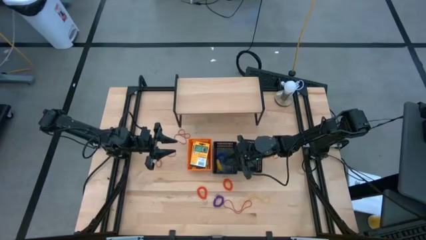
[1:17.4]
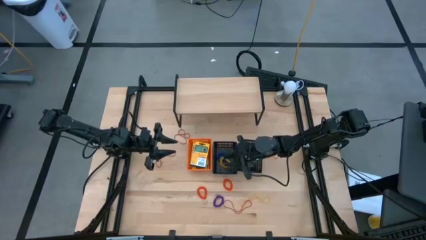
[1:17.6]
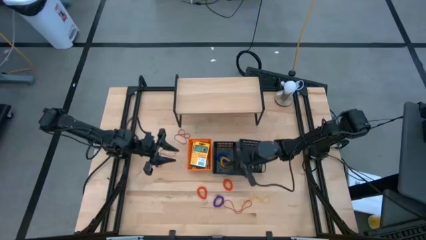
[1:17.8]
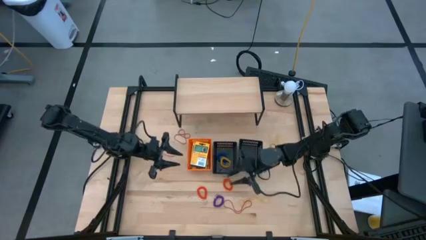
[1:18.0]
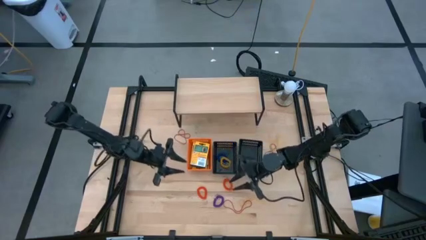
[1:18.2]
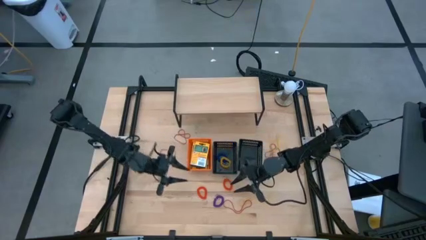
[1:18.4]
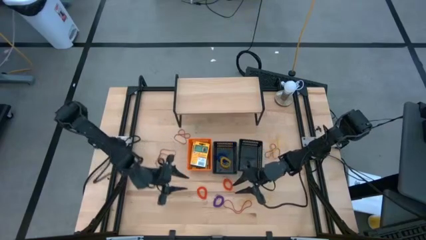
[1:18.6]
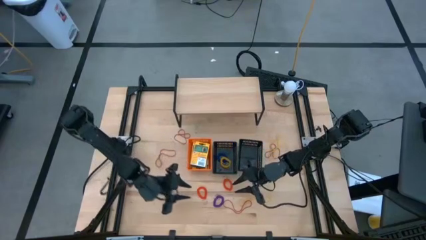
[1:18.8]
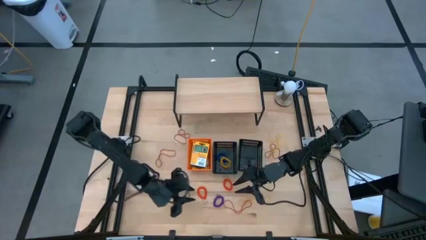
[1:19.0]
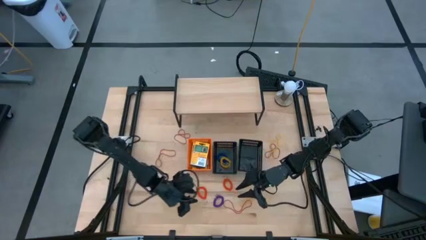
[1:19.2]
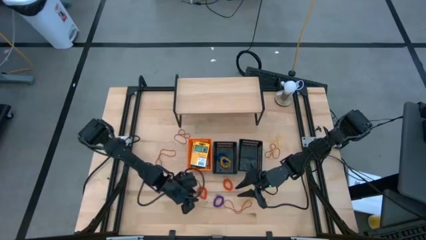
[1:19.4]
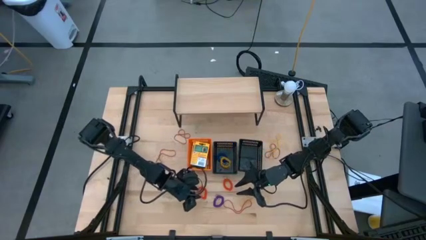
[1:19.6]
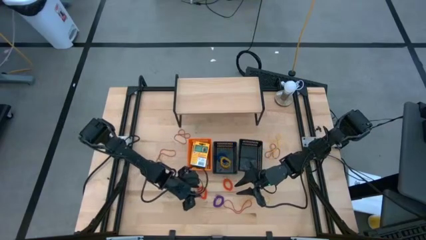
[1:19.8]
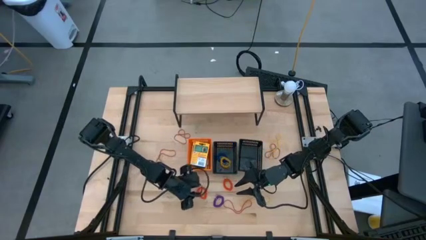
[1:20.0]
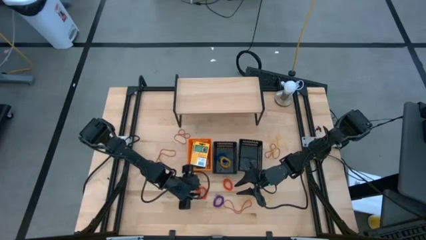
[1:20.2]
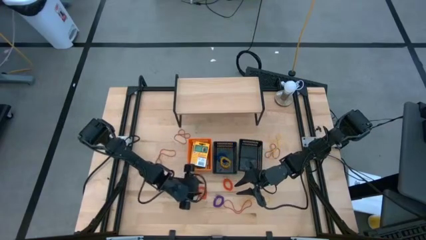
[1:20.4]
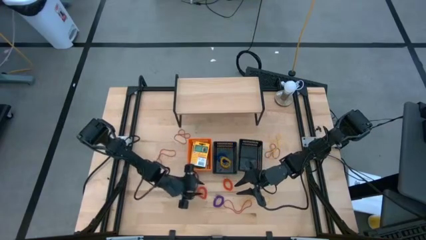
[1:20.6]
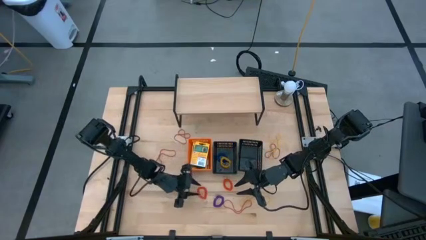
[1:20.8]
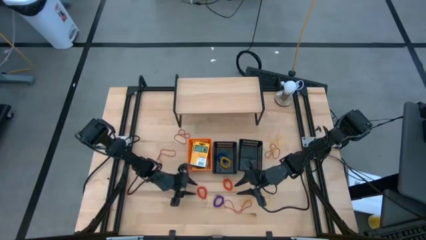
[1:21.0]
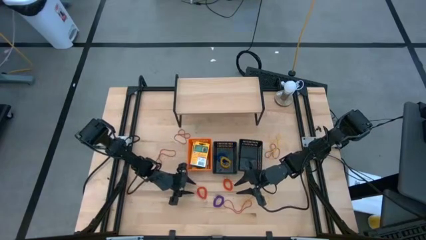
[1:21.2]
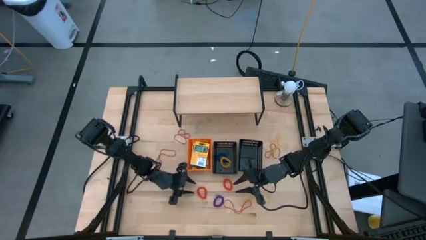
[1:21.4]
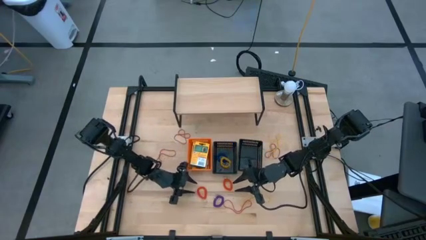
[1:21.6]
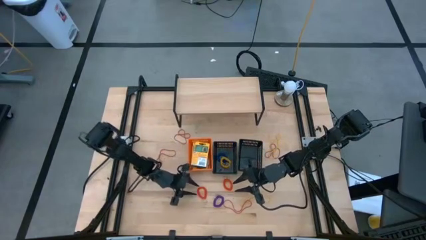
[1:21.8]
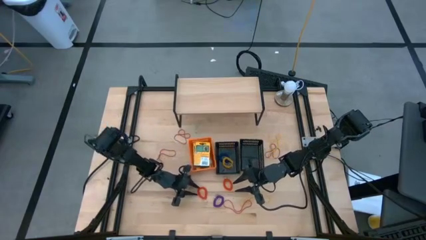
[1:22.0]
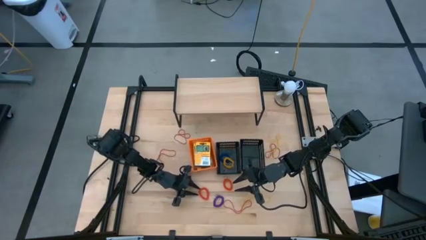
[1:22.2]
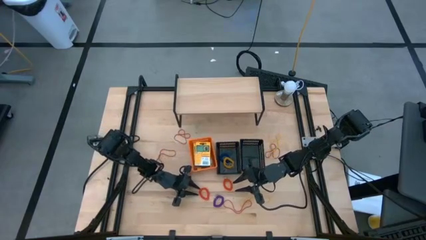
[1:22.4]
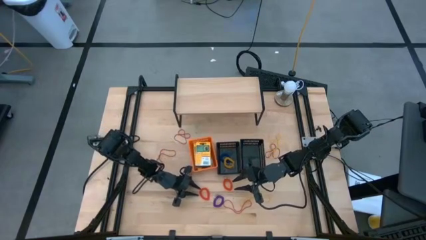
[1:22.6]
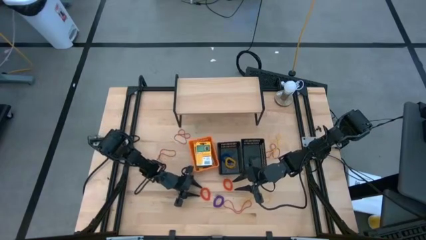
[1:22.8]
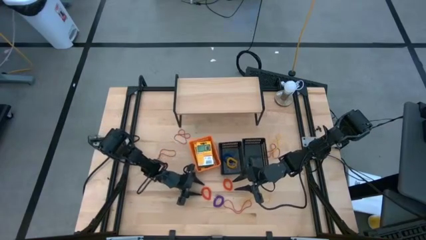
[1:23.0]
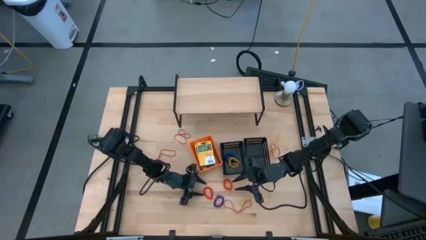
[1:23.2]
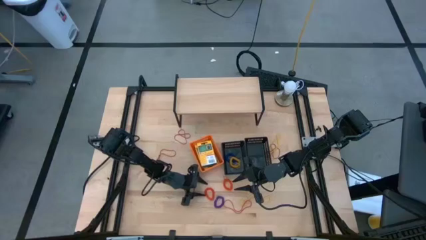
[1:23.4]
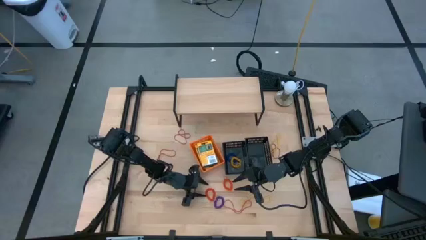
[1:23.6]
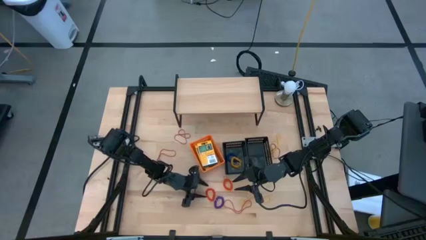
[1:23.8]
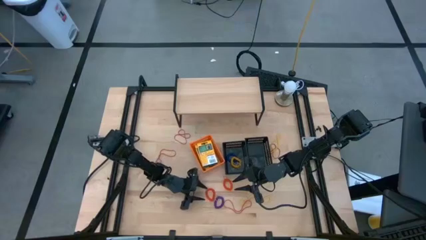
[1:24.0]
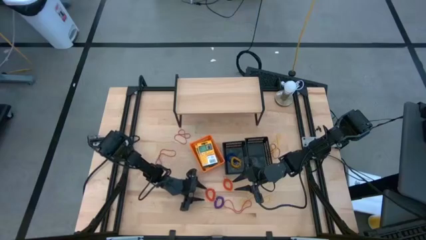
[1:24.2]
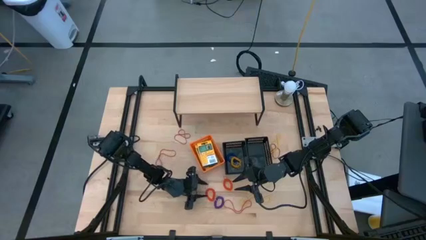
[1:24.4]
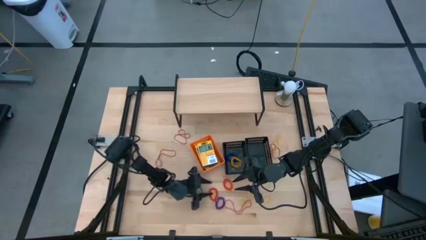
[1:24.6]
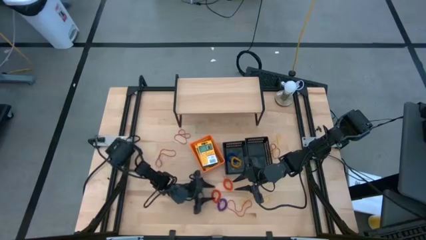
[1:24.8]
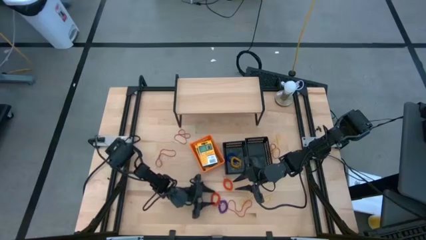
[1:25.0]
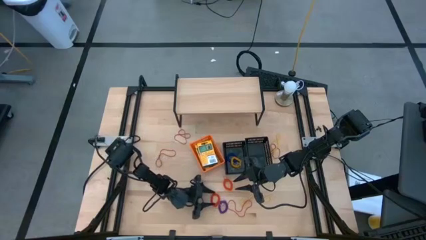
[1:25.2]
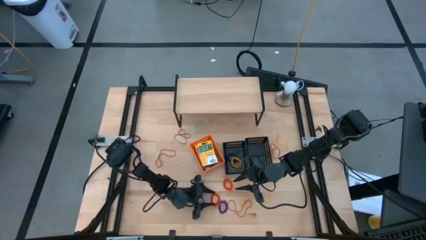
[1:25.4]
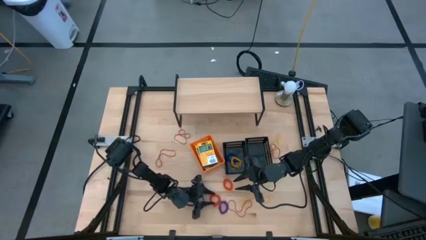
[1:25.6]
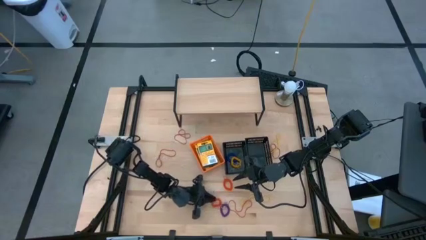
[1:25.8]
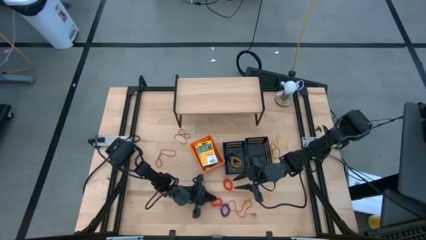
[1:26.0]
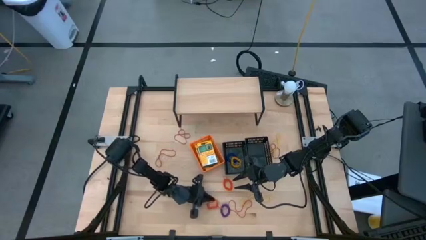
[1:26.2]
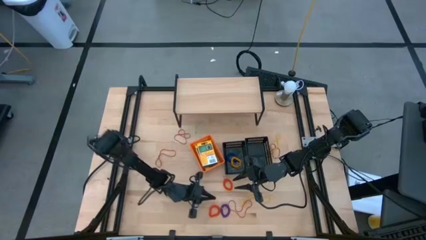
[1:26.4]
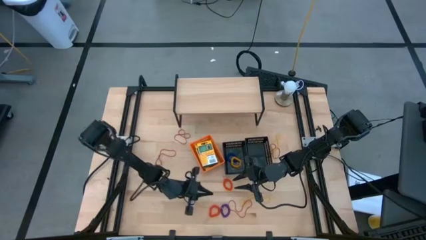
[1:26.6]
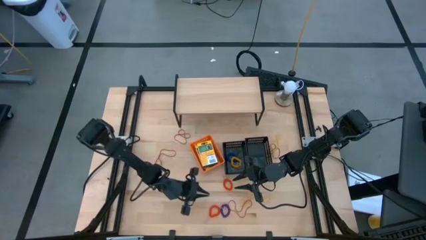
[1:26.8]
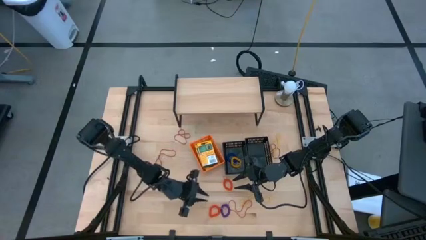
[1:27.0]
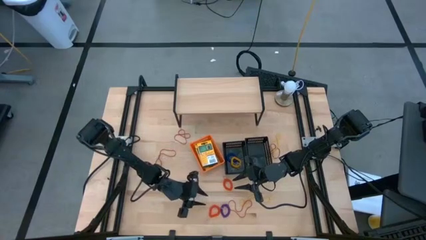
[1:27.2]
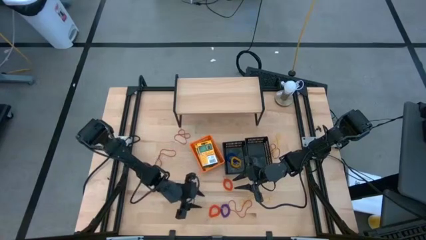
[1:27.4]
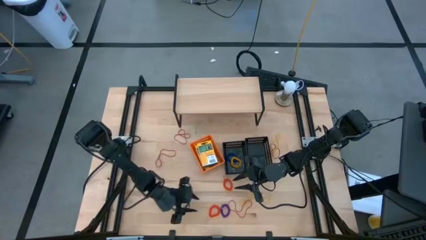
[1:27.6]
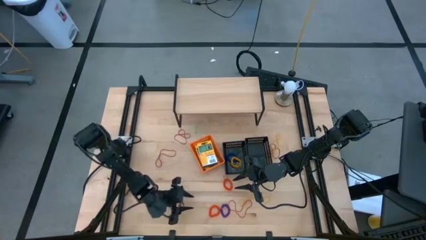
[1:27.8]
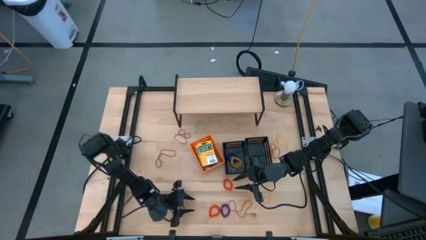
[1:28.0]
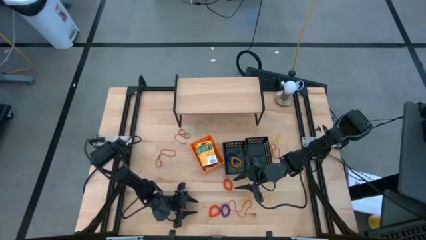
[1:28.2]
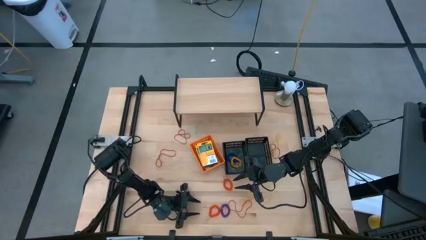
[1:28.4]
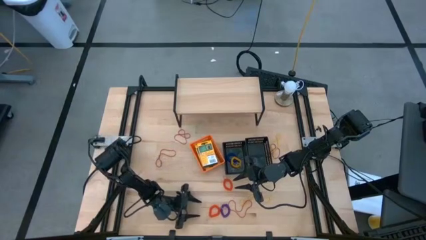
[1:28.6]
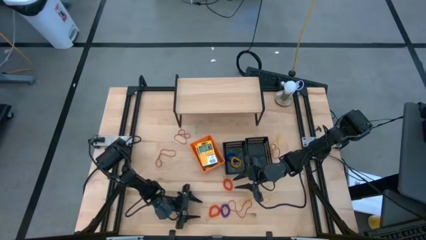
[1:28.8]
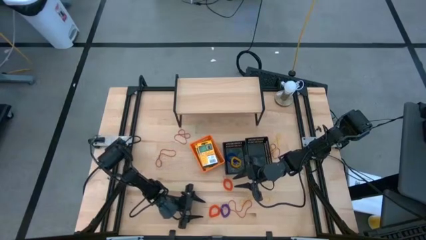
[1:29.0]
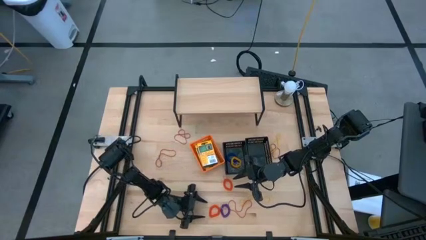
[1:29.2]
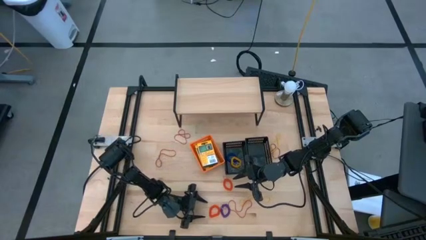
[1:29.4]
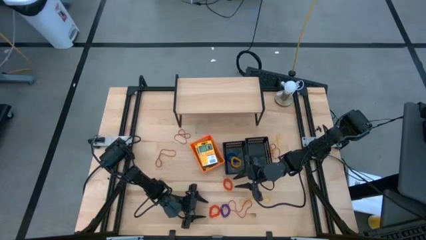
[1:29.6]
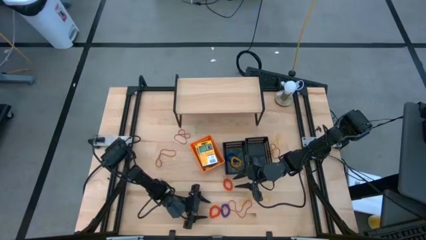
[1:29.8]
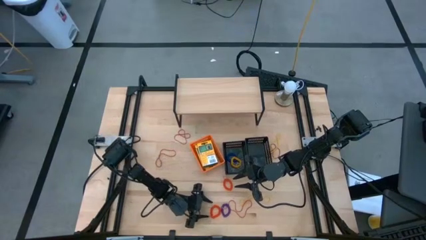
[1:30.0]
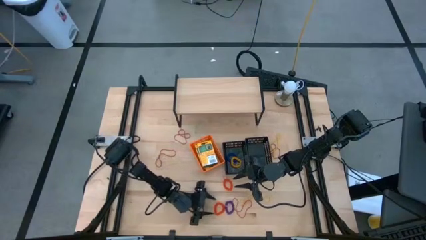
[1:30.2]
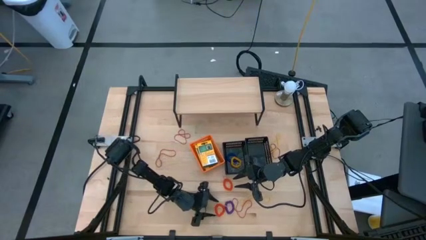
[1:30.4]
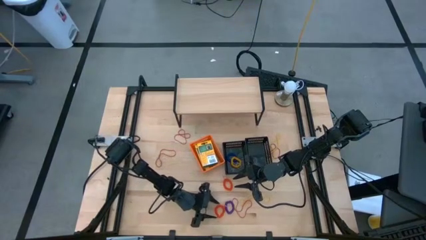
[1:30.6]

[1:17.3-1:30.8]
Task: Pick & Place Office Desk Supplies
Put the orange spring keychain into the left black bin

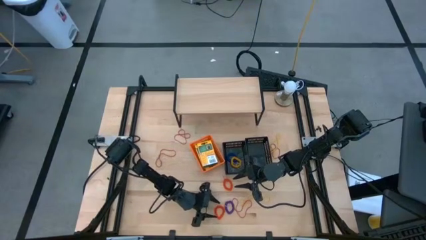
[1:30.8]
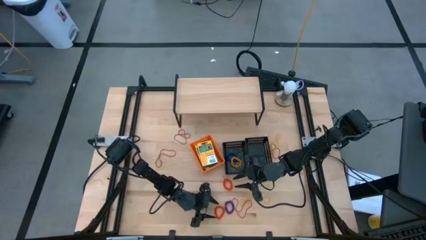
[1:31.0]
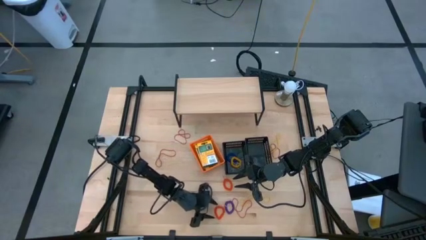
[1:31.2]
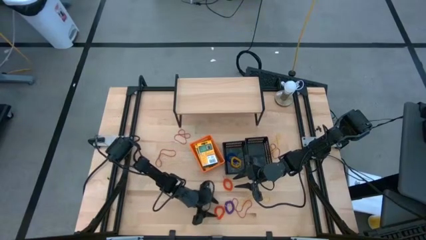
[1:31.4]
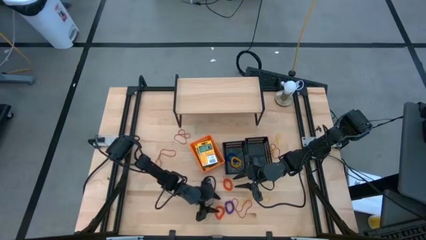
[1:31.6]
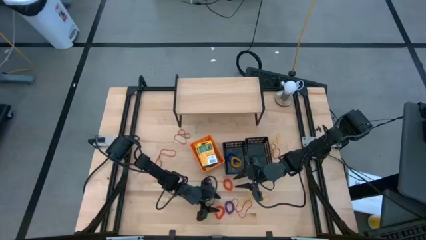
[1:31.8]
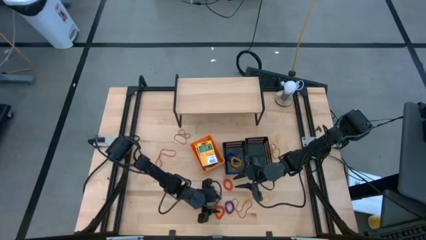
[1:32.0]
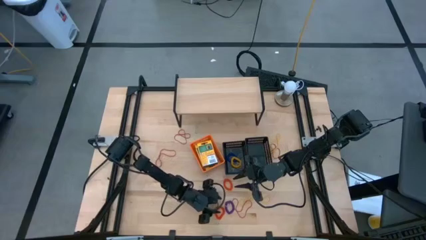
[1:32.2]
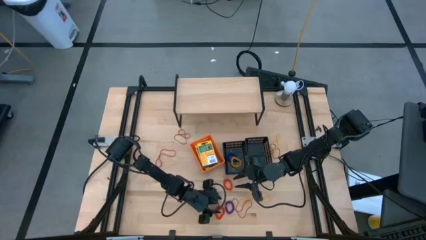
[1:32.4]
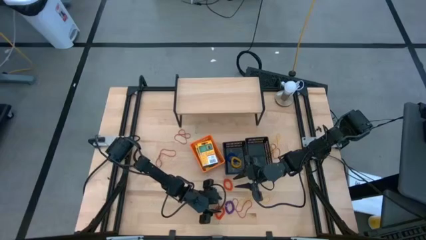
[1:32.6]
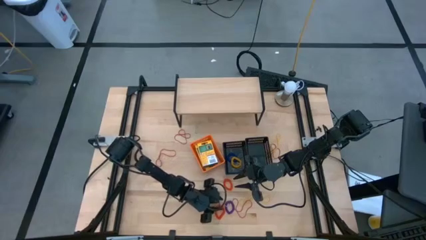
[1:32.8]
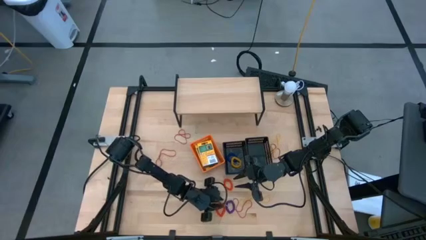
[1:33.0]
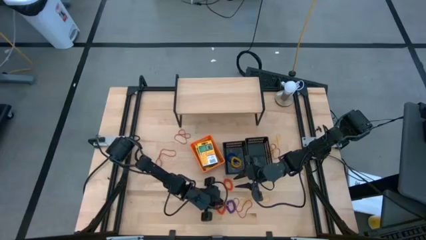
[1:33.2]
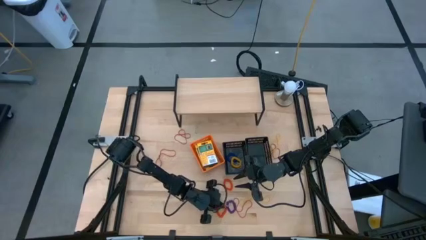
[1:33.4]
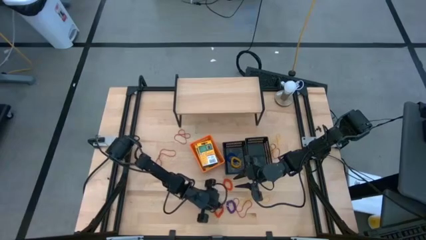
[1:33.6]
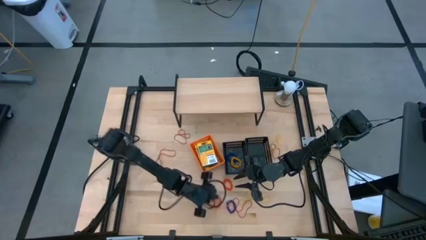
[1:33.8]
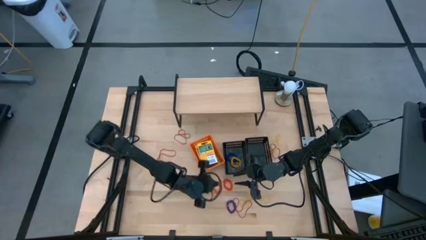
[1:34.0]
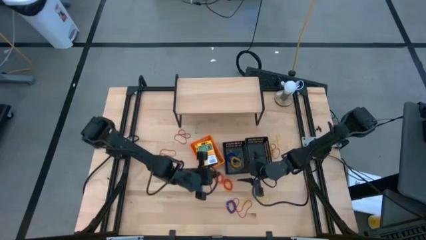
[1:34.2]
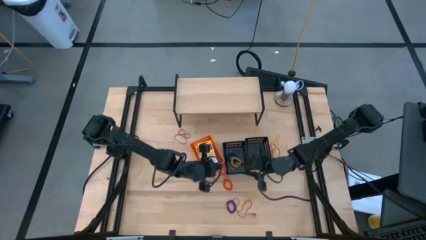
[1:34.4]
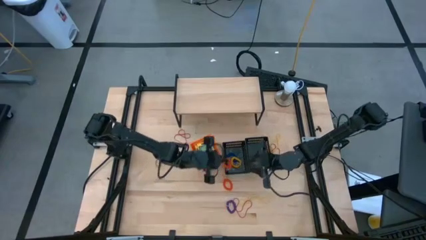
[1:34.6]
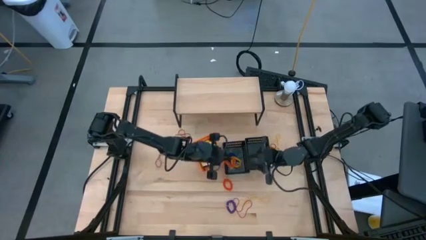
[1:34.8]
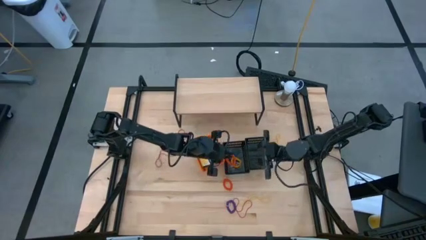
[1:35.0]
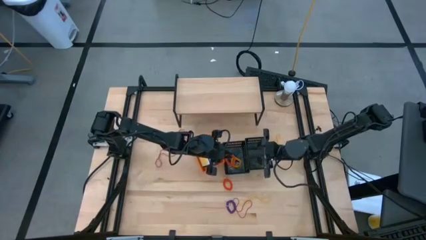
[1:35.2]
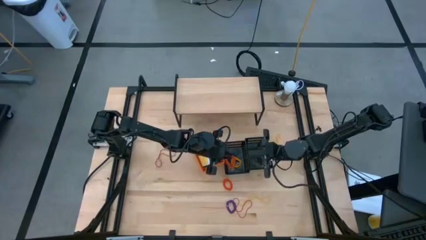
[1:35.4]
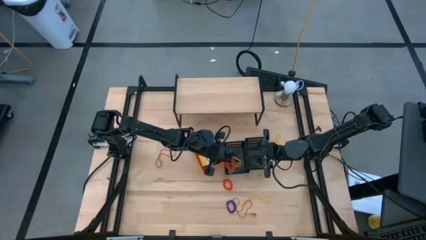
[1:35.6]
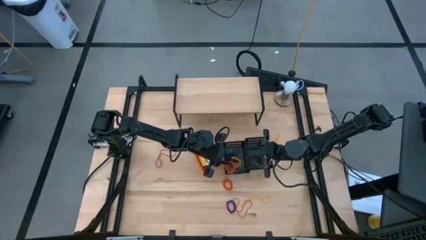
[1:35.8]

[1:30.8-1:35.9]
Put the orange spring keychain into the left black bin
